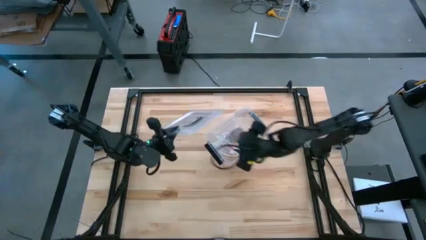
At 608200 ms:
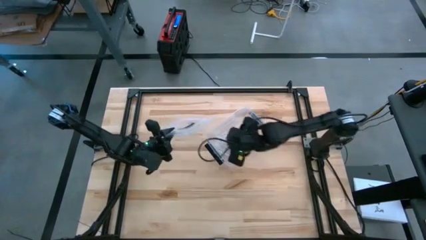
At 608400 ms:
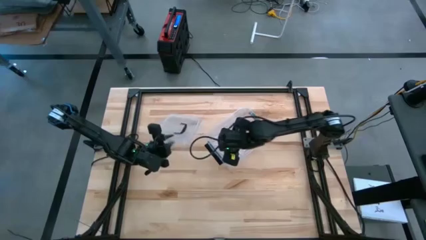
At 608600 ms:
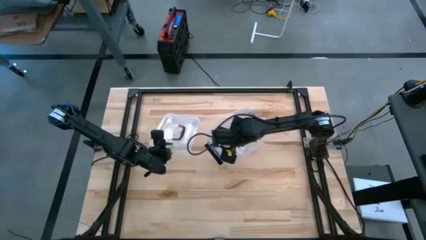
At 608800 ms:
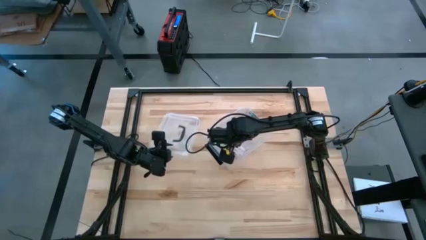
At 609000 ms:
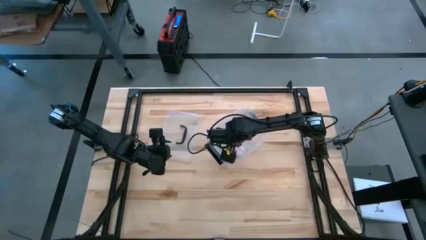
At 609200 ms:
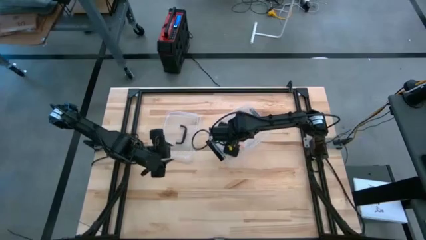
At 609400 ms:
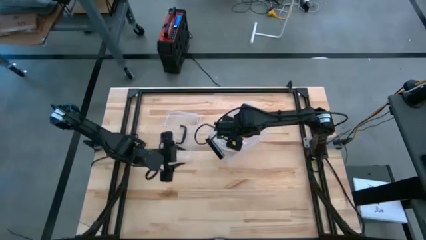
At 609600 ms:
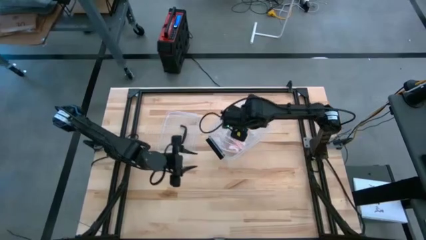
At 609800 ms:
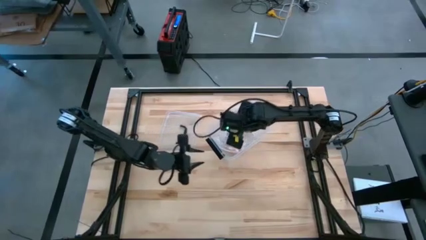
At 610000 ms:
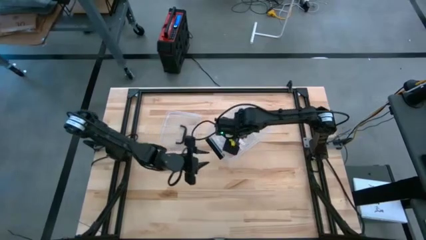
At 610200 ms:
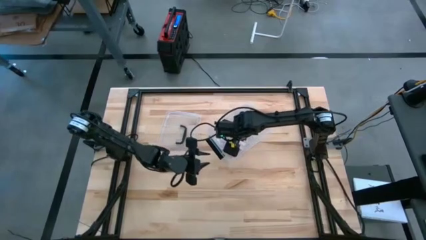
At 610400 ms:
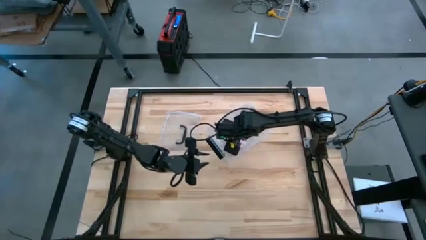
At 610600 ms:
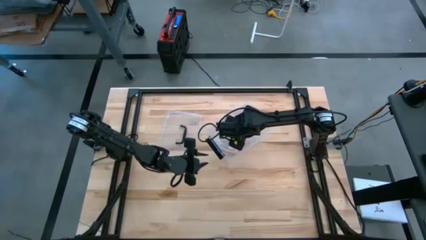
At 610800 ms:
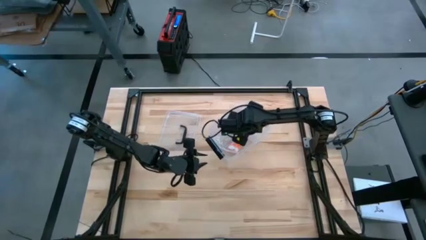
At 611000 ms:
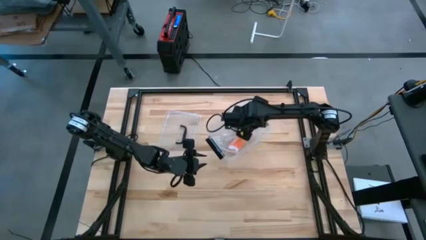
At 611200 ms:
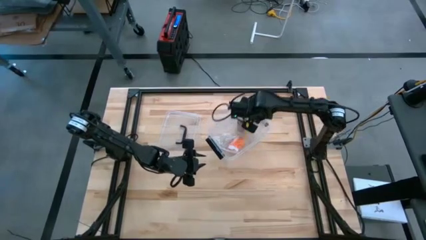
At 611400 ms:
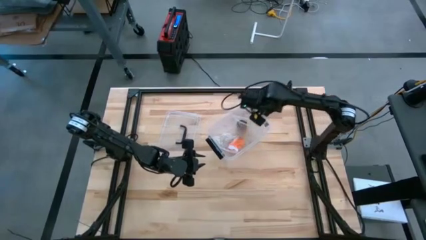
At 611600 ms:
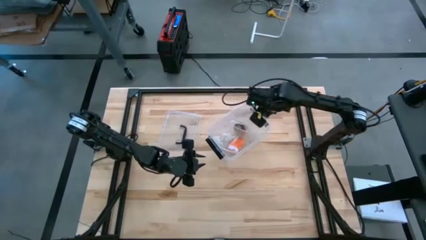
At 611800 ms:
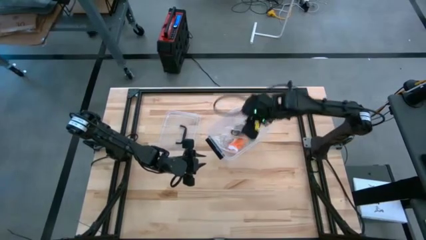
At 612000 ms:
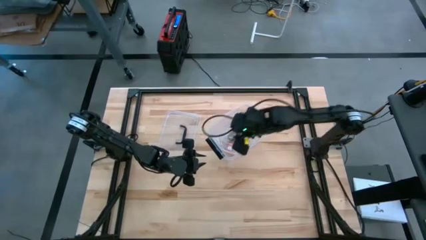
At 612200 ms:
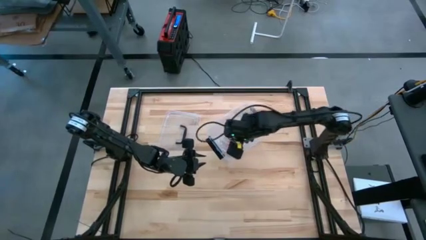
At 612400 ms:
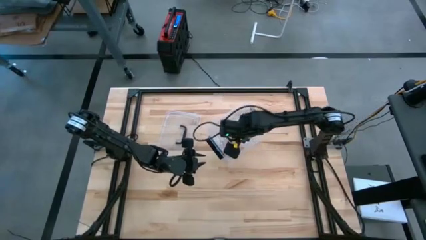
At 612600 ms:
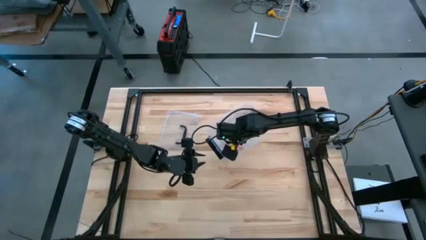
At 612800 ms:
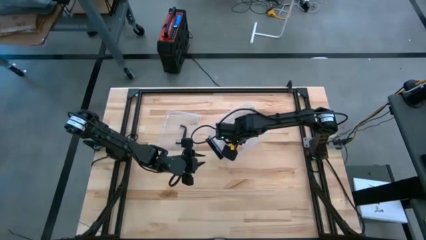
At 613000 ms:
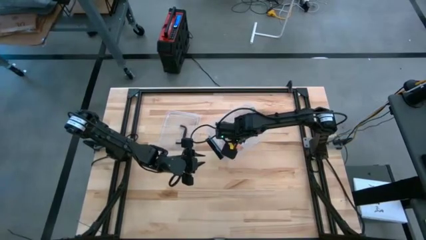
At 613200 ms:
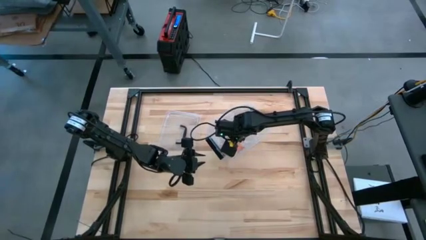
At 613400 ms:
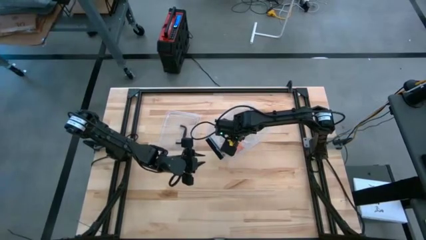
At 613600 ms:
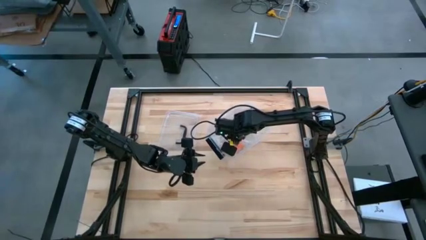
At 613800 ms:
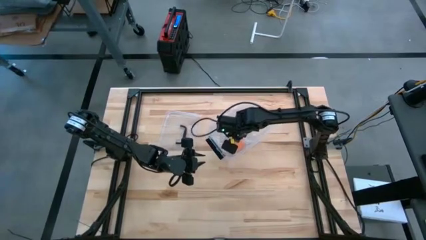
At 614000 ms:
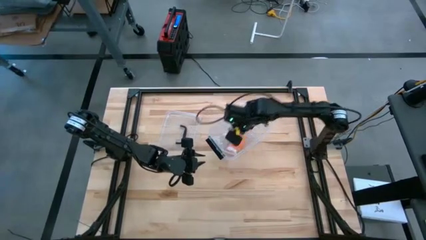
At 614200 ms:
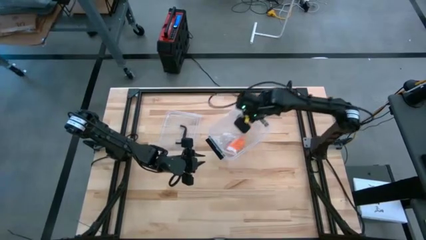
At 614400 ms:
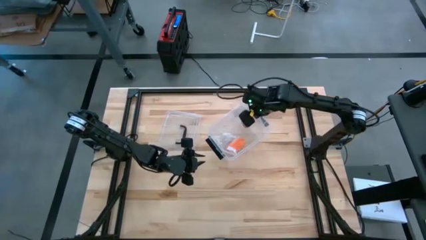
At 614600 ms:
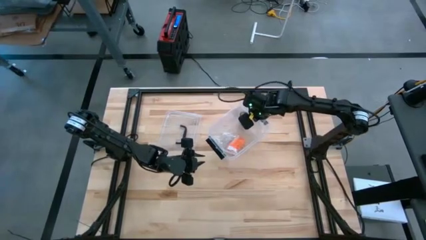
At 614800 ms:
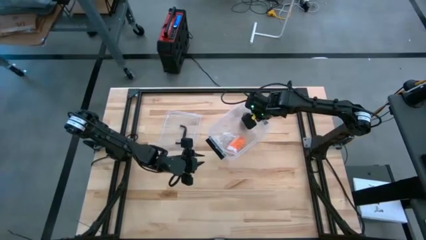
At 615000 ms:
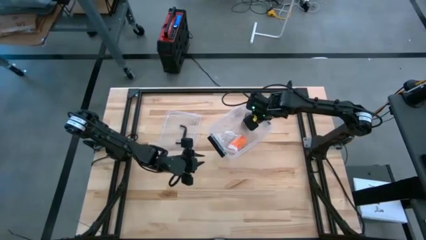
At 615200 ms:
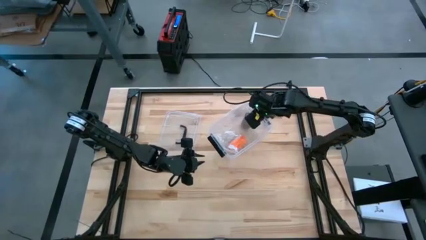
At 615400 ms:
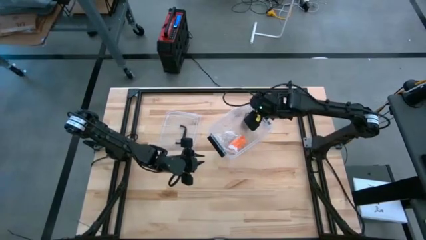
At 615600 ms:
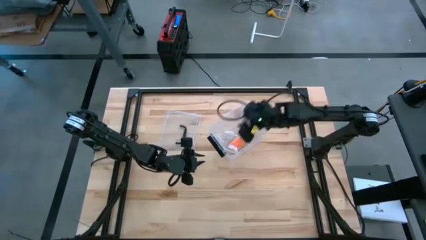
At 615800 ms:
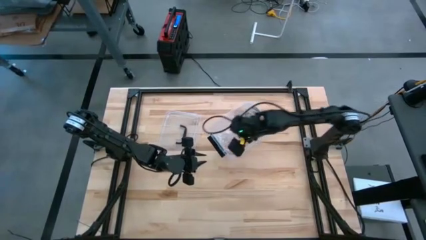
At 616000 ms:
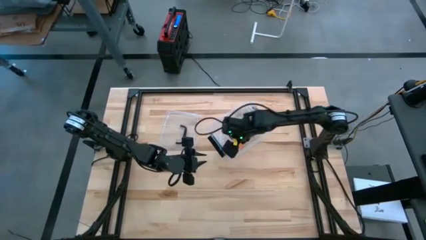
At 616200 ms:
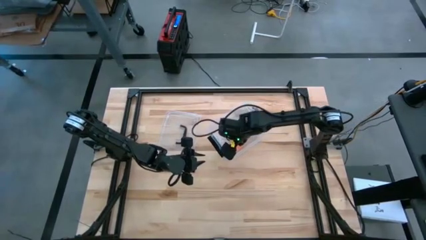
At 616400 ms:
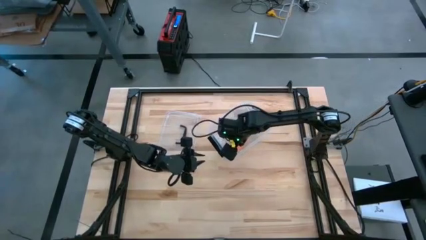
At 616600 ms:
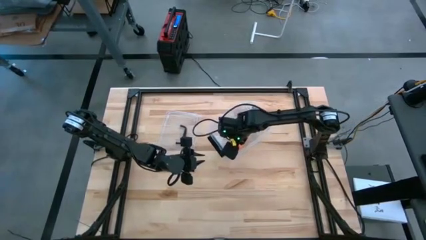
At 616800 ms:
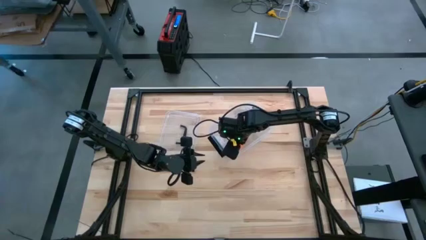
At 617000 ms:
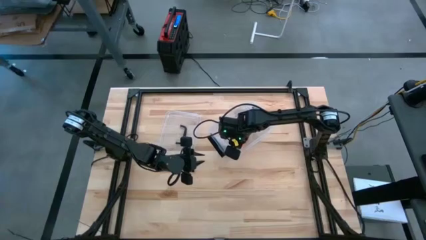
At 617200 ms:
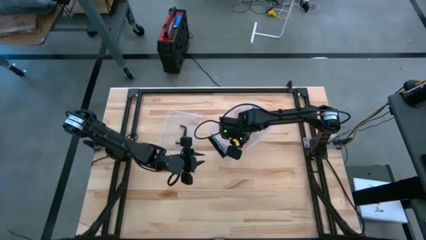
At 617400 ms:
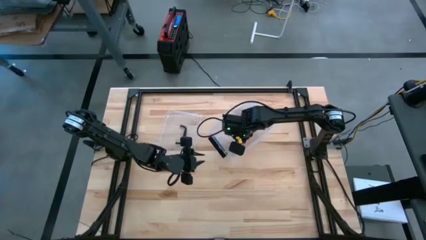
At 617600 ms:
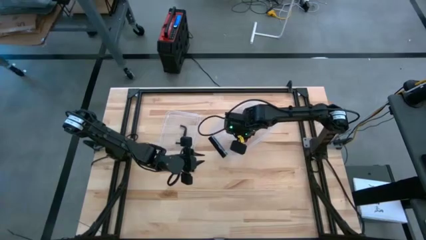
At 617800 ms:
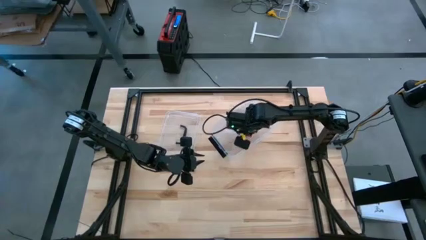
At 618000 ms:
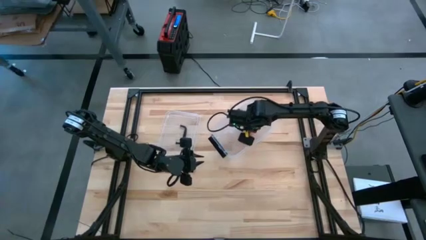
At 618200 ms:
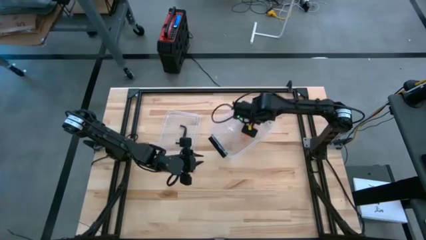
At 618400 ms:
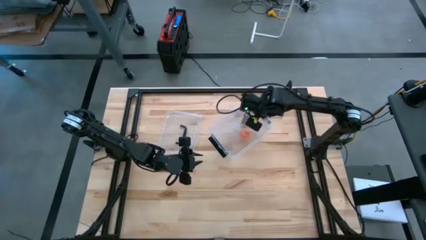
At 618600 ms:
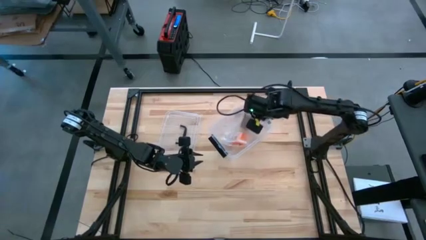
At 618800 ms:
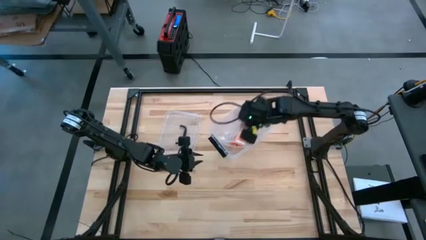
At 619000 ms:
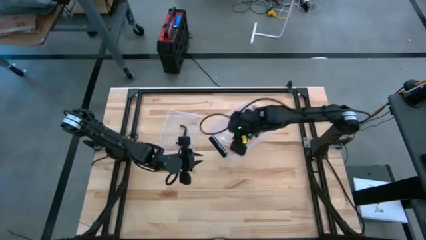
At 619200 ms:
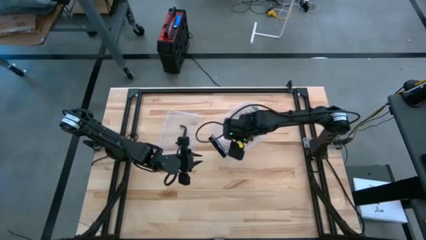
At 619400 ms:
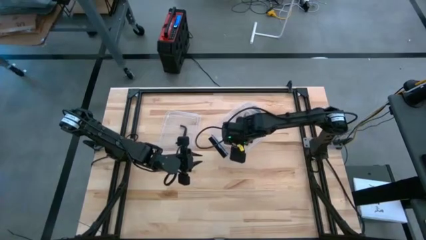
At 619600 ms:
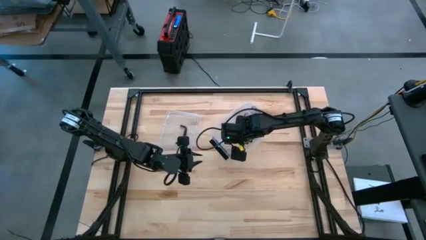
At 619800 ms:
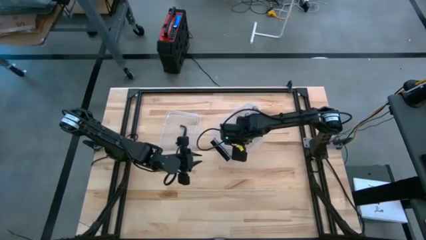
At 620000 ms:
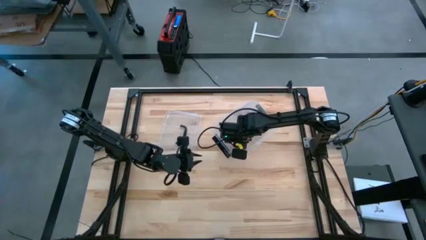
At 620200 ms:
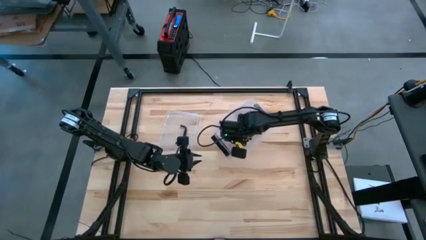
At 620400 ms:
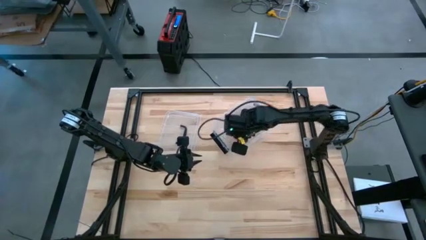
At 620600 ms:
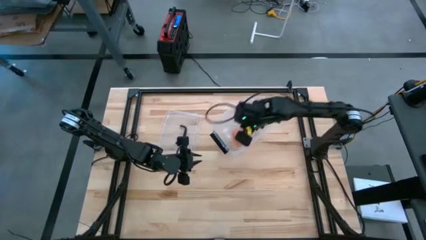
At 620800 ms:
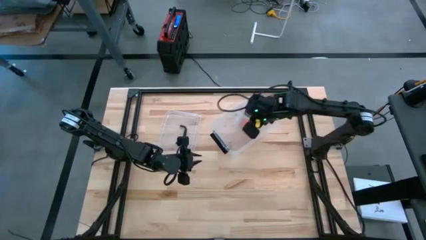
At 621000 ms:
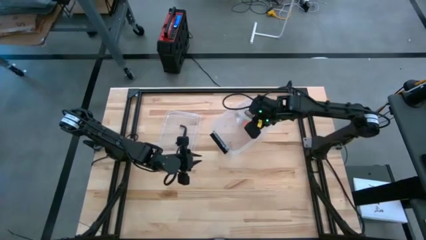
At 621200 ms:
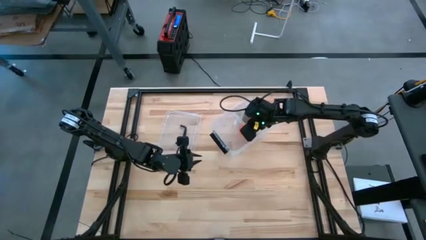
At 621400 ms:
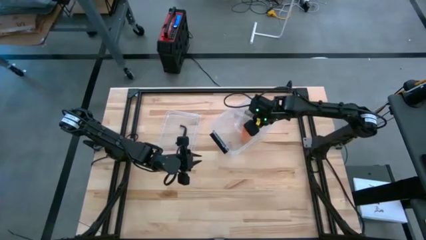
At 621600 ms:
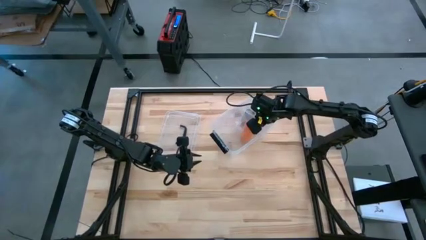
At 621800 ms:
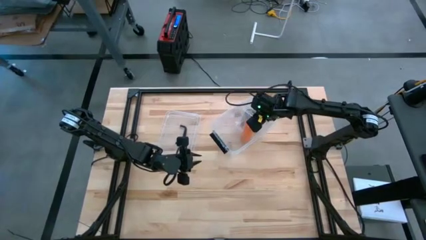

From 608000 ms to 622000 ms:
Task: Roll bandage
Adjust the transparent zip bags
